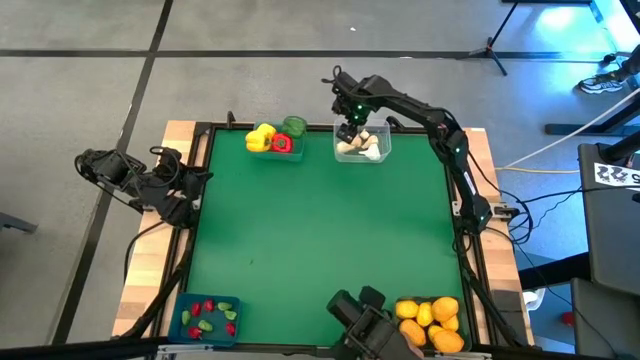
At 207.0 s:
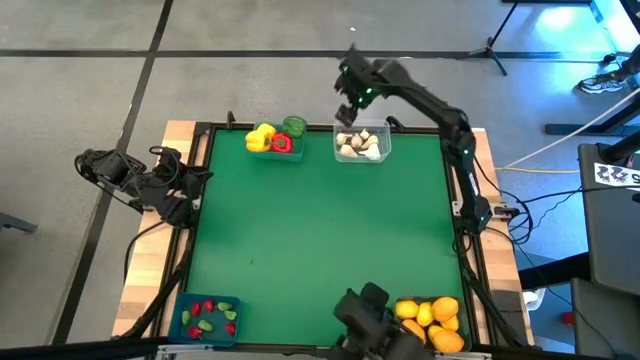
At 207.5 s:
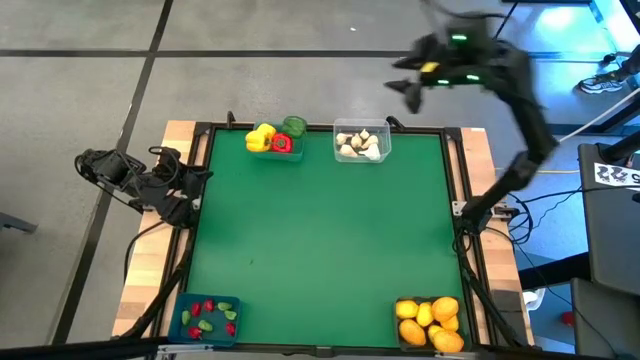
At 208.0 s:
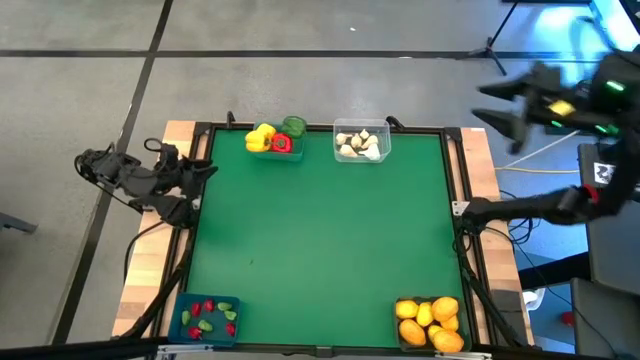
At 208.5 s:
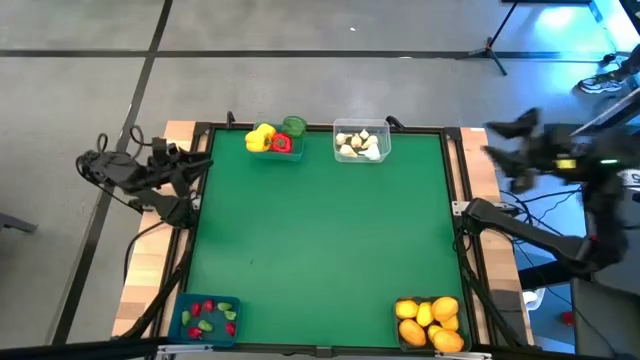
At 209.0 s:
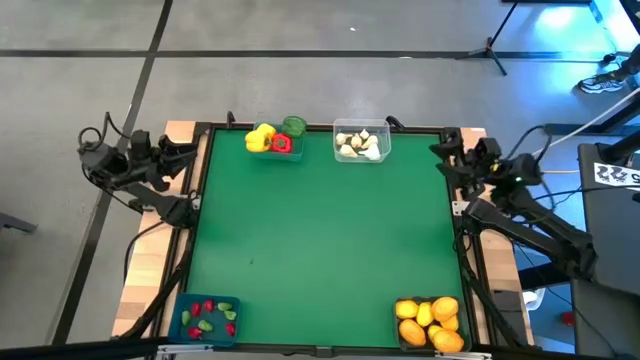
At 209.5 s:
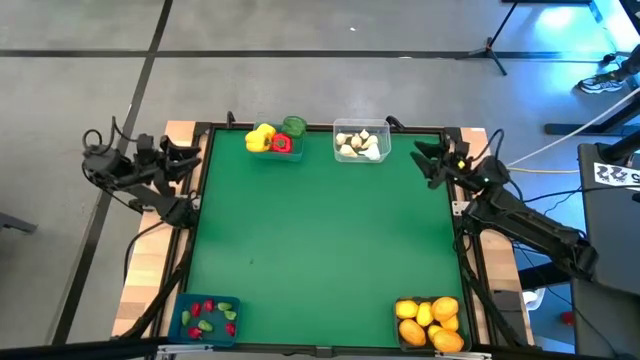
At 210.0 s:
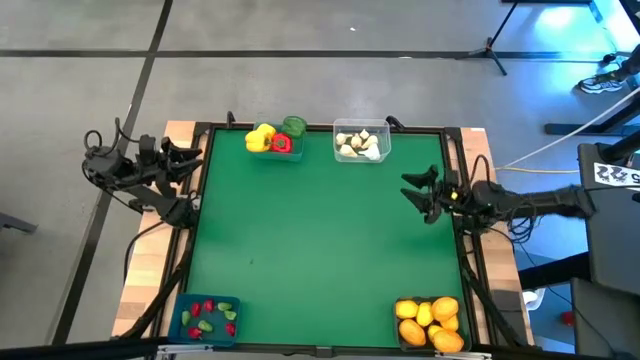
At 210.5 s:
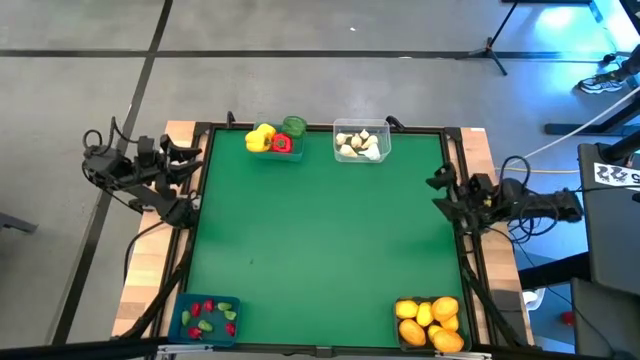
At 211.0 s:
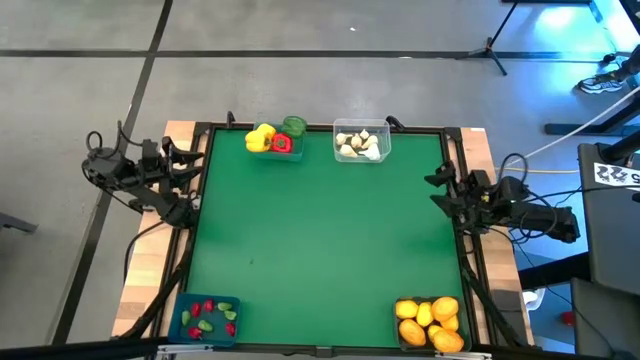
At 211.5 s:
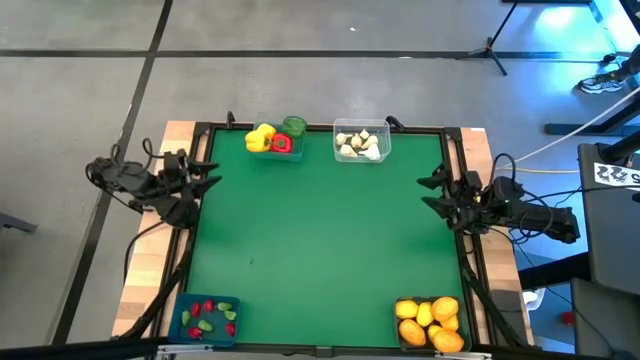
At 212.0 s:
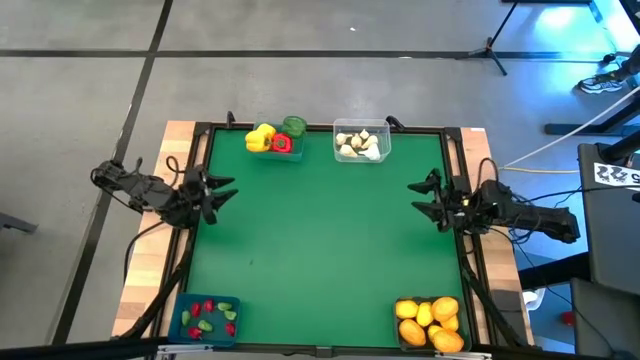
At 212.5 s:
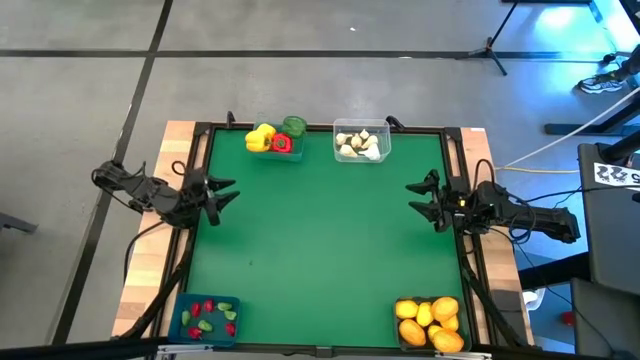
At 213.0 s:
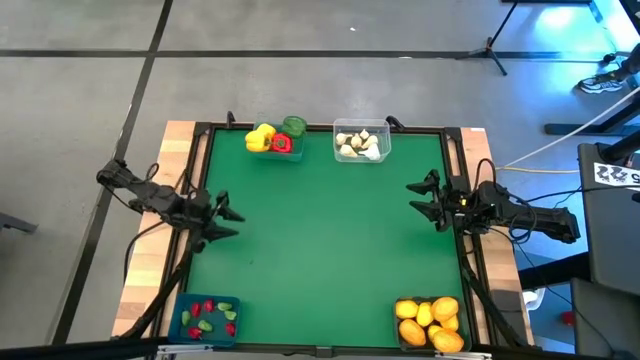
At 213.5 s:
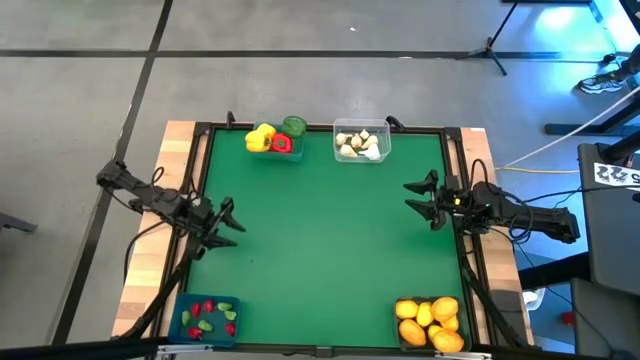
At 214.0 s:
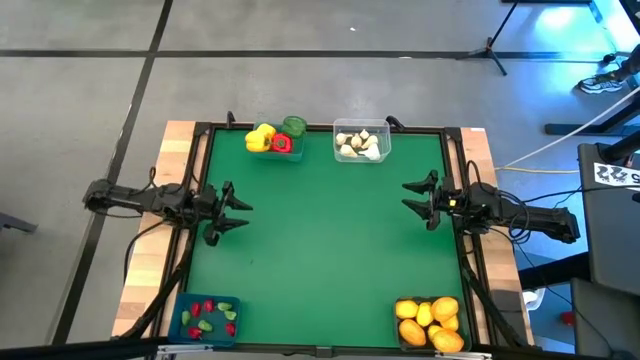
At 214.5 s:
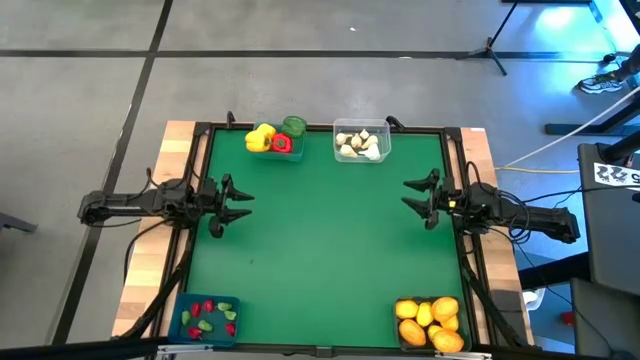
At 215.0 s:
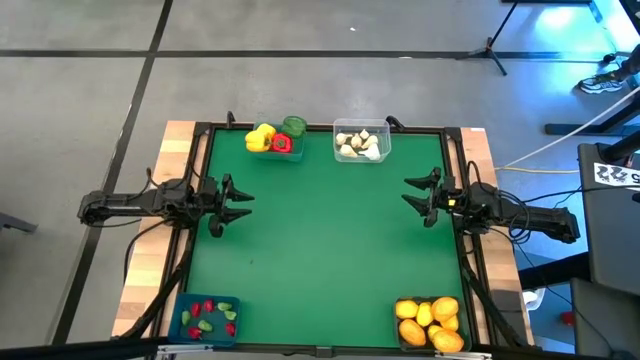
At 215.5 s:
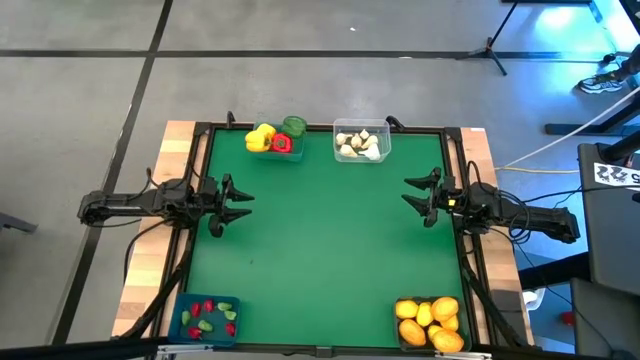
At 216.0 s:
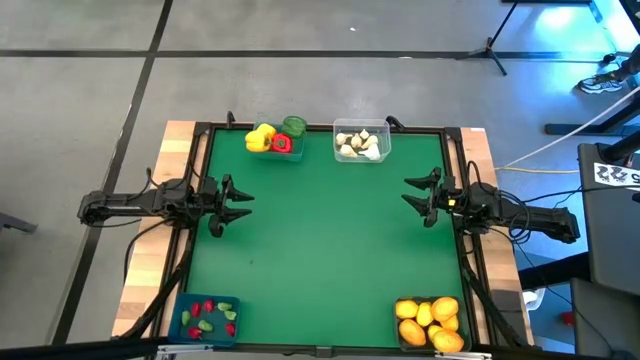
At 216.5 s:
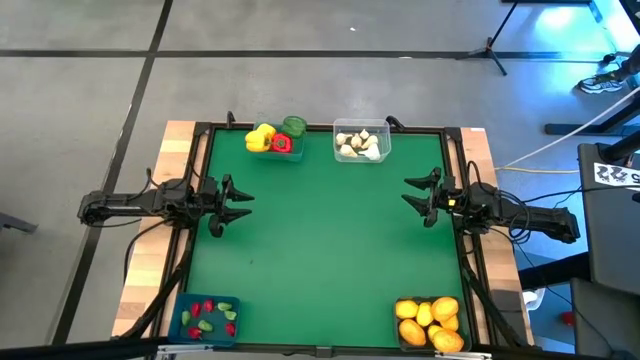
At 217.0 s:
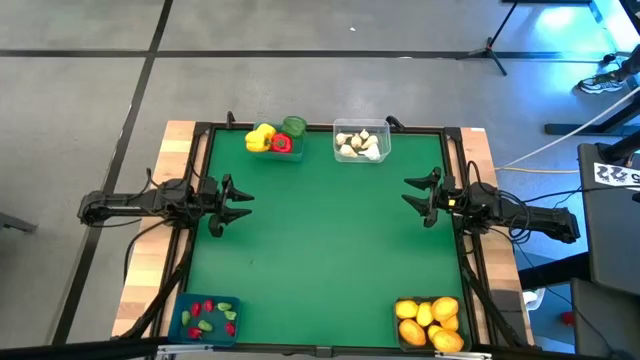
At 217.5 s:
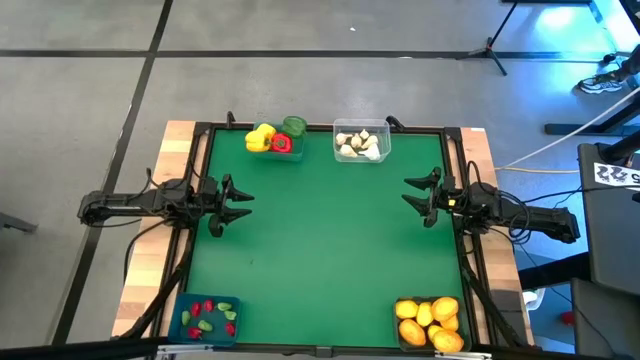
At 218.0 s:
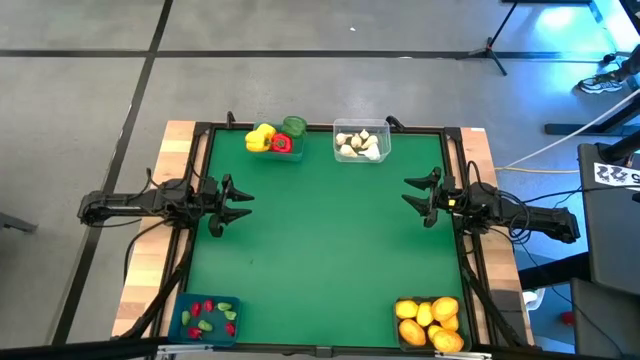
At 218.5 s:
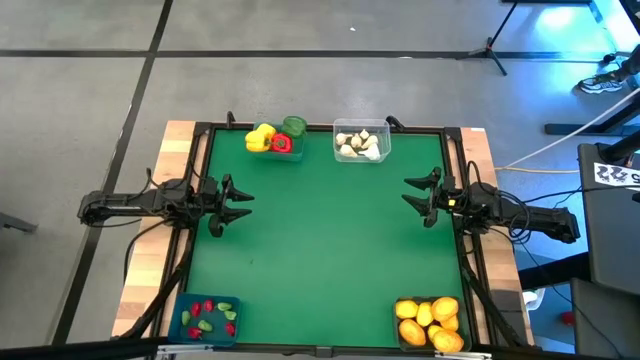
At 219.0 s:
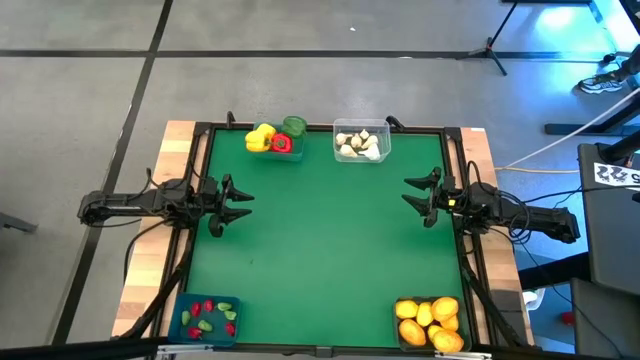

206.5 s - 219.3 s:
Task: Sort produce into baskets
Return to Home Position

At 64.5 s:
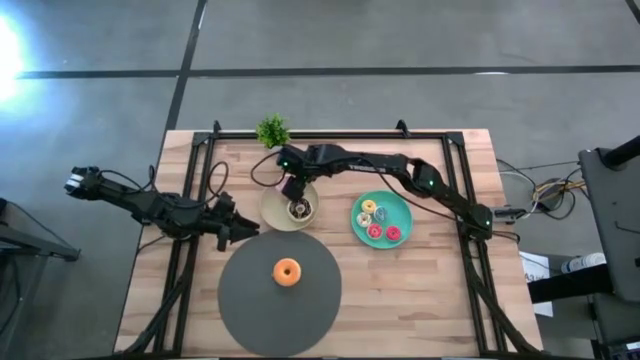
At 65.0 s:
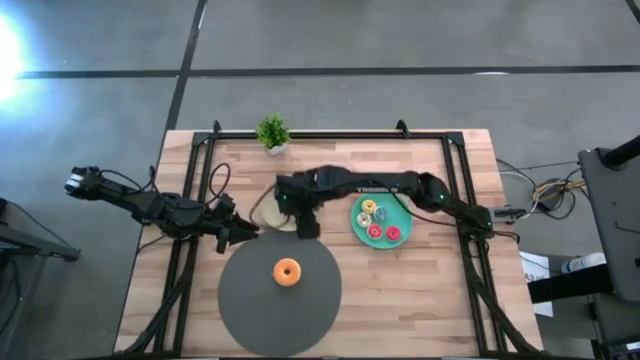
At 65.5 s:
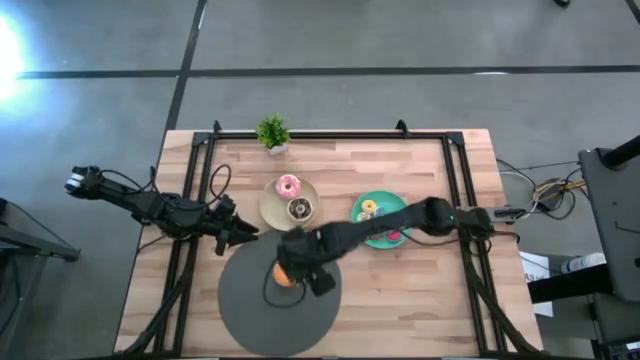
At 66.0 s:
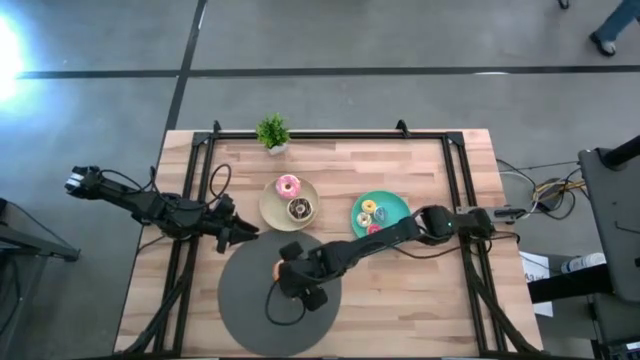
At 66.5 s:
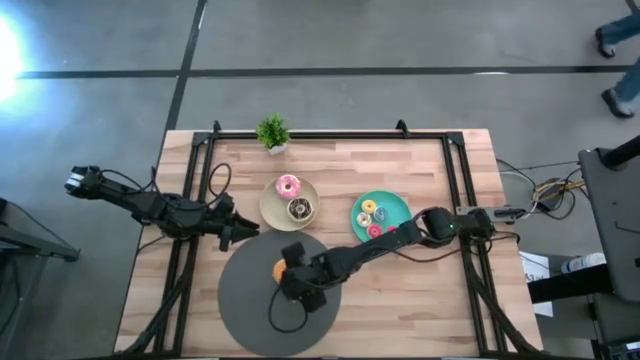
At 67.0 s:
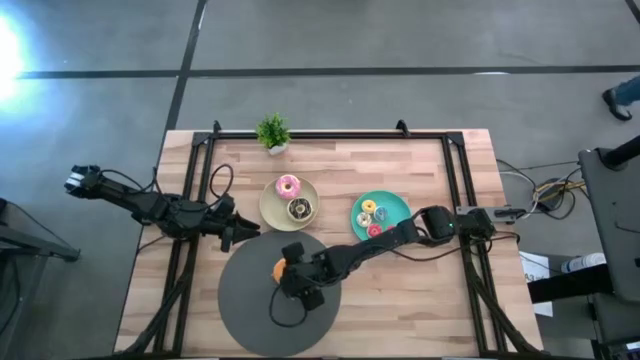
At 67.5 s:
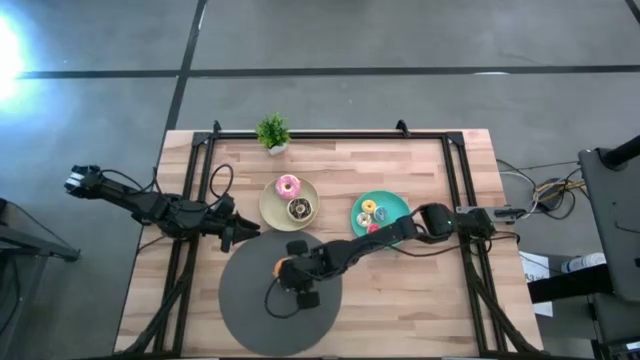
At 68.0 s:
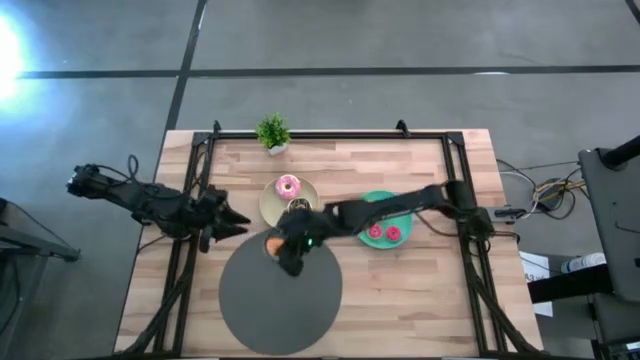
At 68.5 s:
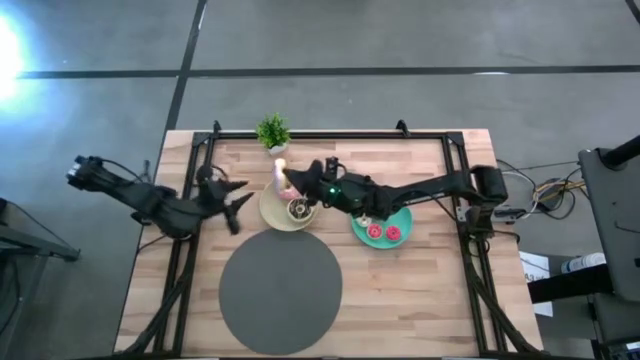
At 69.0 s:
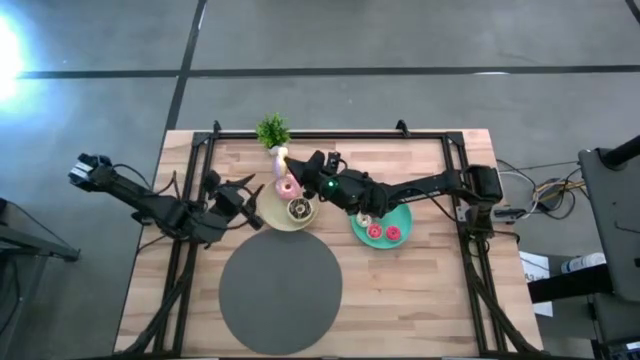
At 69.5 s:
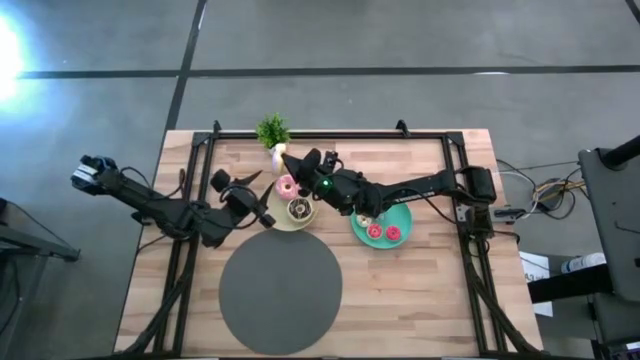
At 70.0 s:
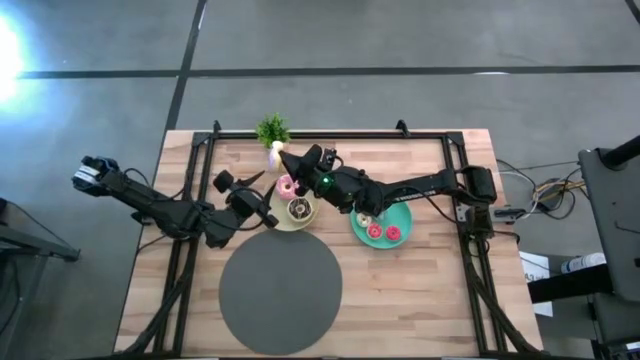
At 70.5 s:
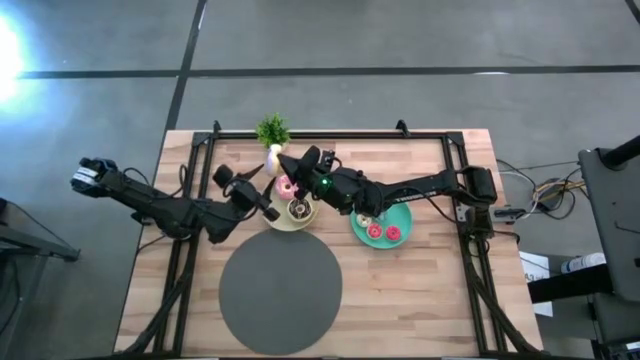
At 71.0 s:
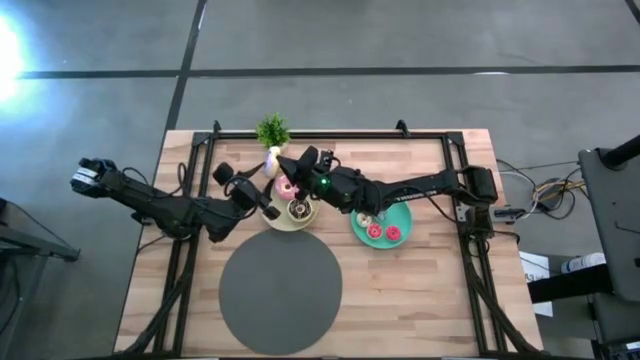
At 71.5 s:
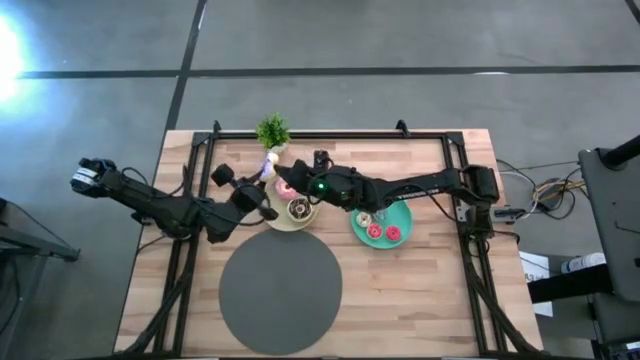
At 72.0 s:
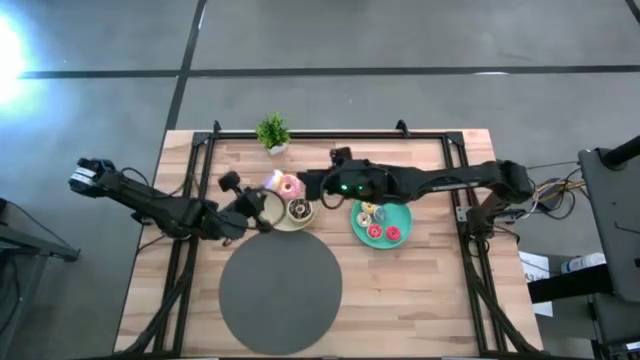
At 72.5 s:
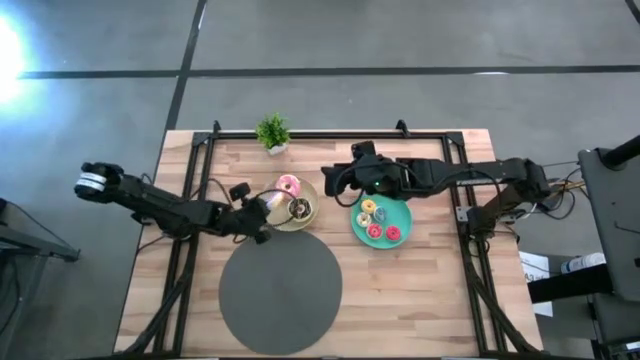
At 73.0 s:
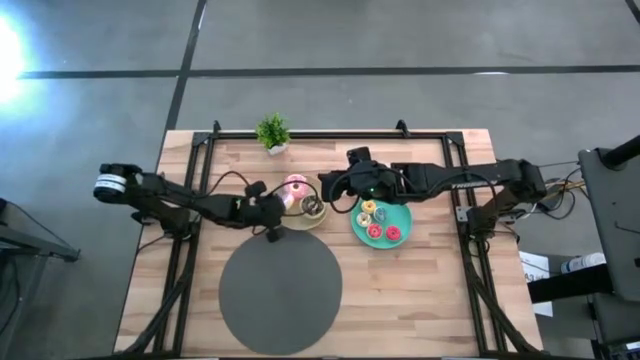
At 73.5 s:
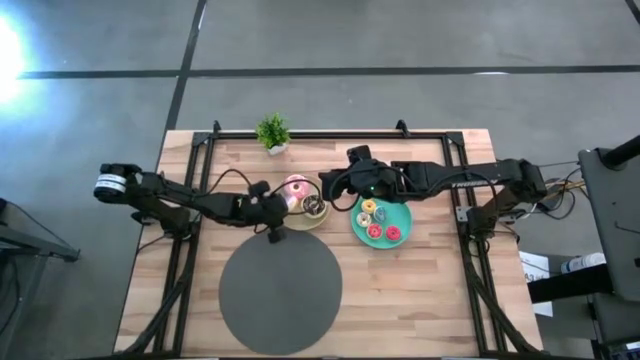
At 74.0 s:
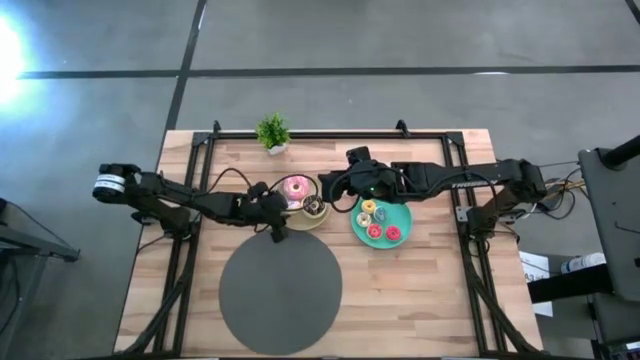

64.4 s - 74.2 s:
Task: Pick & Place donuts
Put the large purple donut on the brown plate
